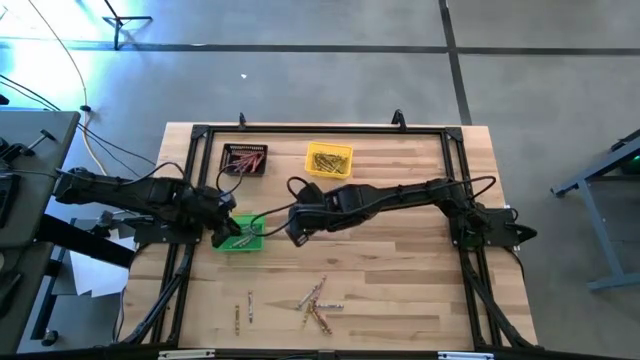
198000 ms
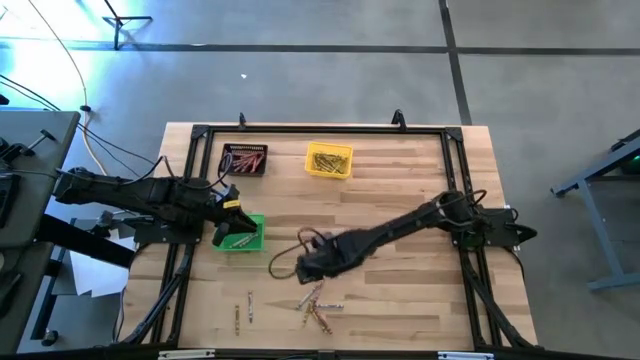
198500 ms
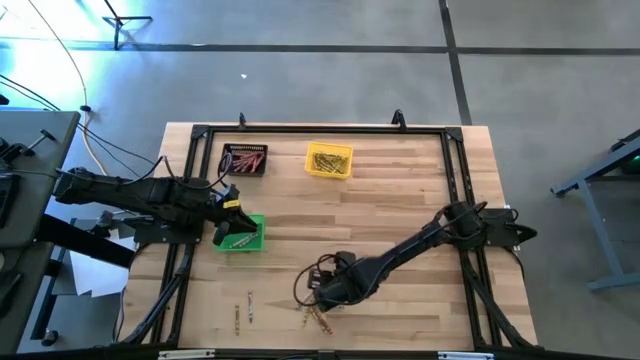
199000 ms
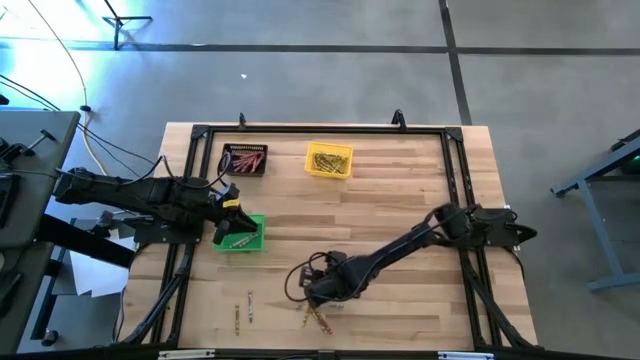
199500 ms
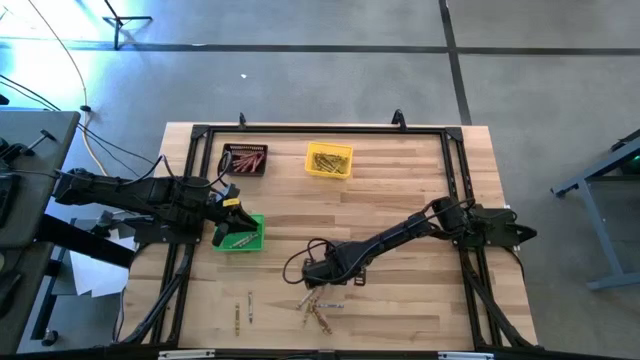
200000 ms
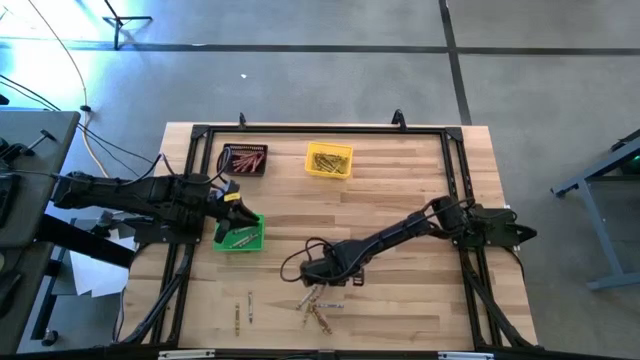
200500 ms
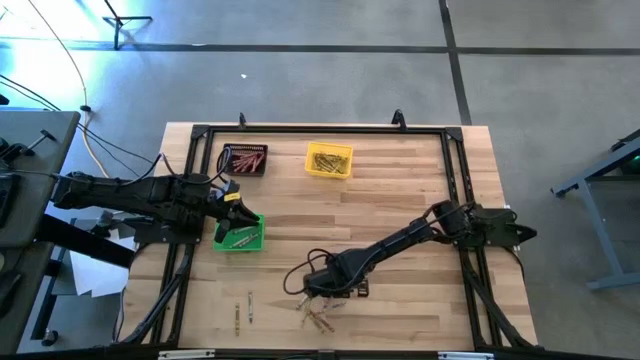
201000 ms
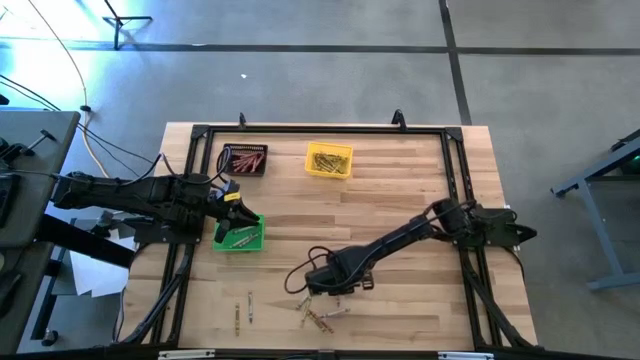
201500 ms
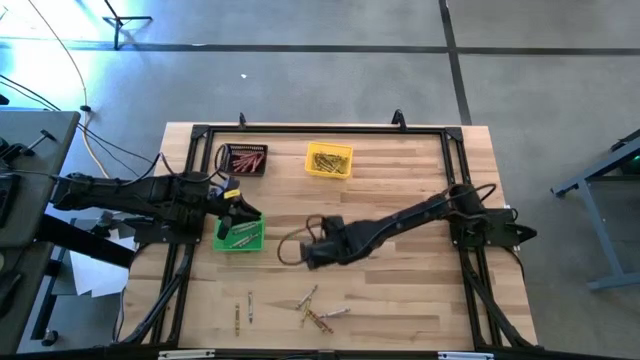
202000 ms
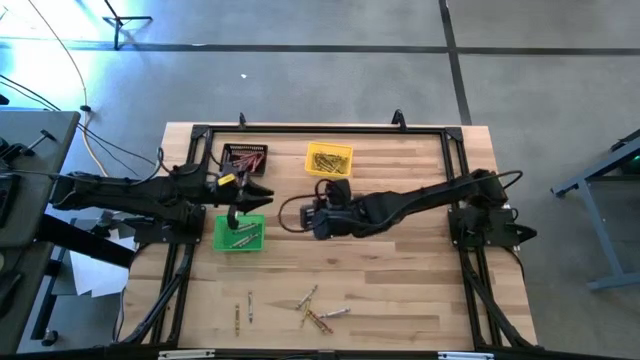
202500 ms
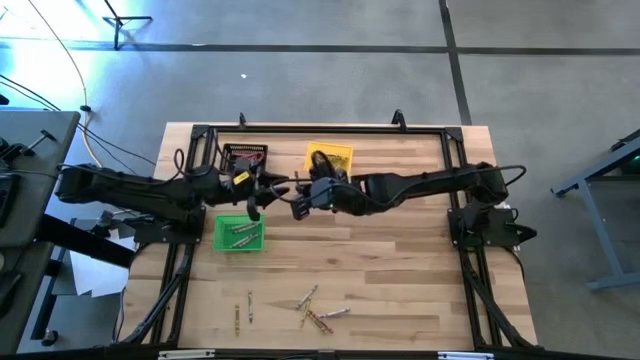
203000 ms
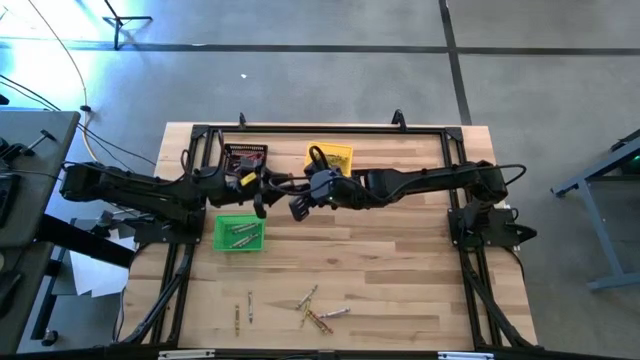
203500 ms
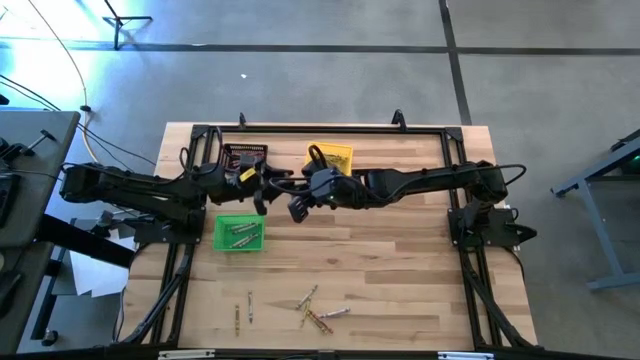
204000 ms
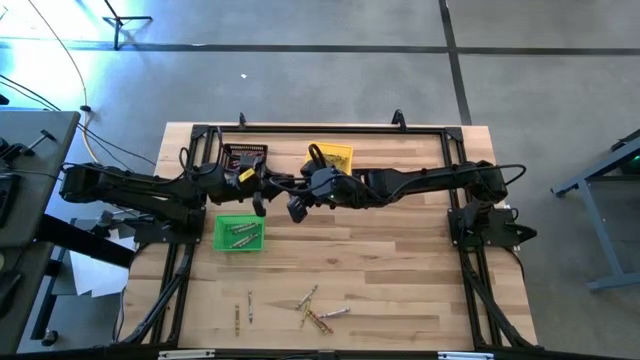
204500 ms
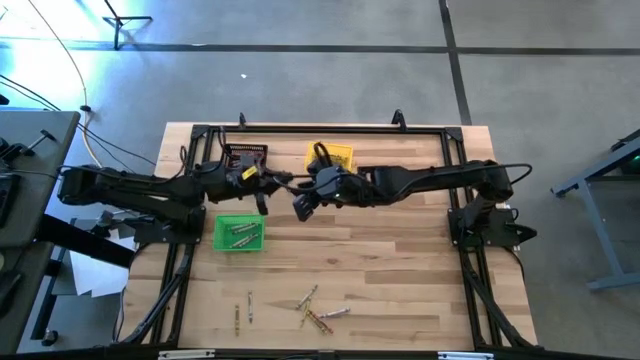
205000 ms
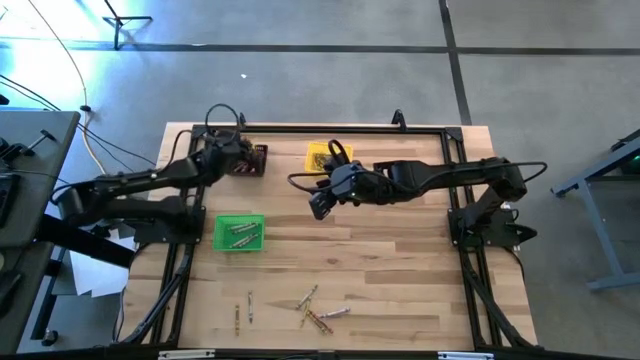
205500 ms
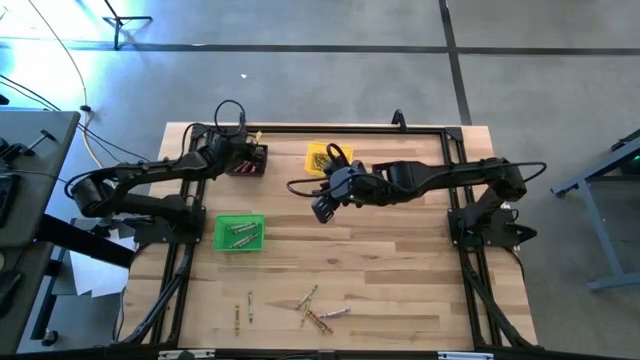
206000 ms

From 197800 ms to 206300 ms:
Task: Sort crayons
Put the red crayon into the black bin

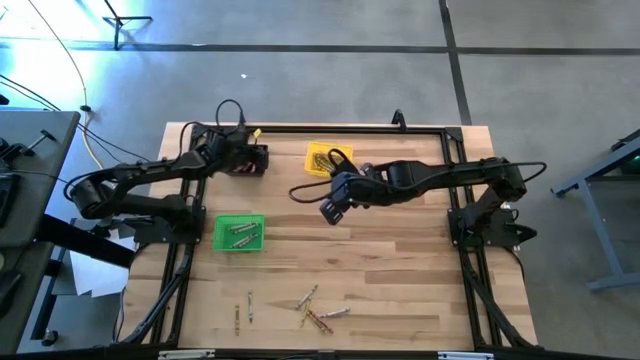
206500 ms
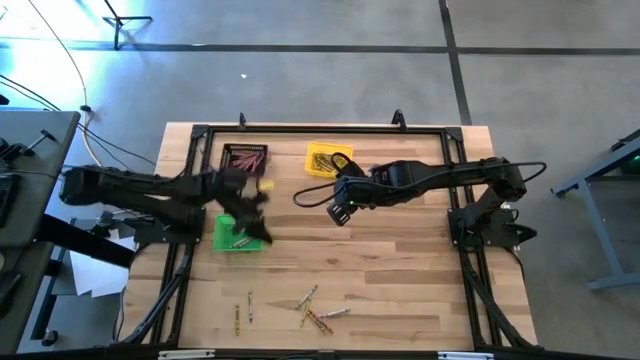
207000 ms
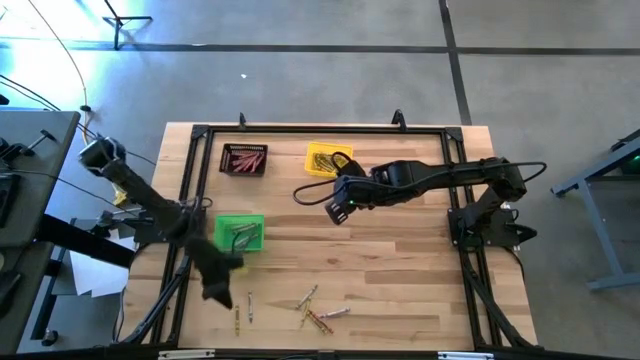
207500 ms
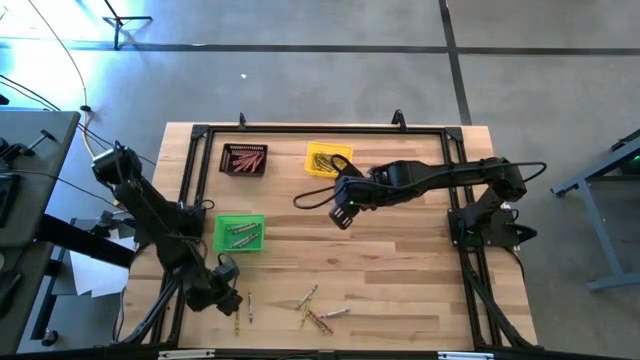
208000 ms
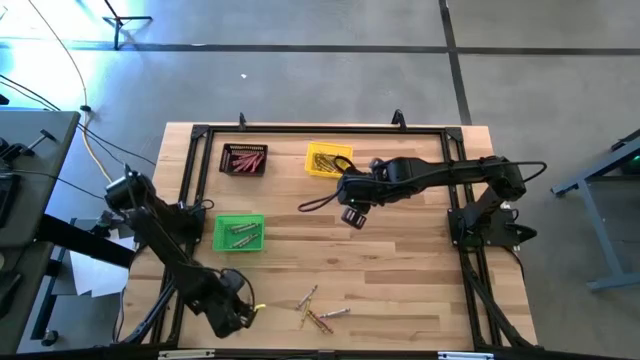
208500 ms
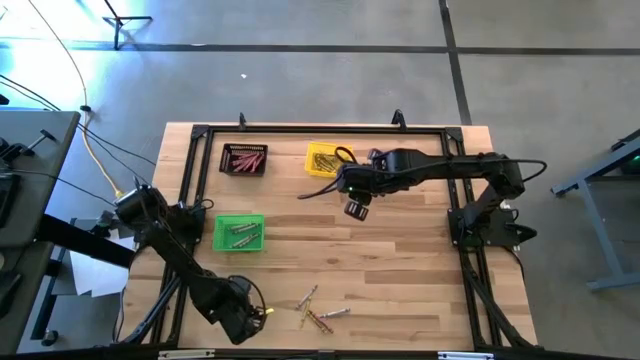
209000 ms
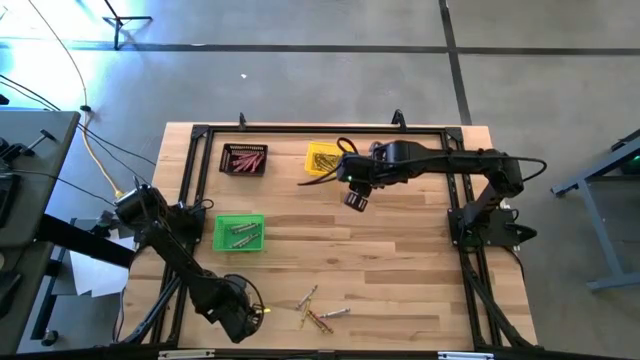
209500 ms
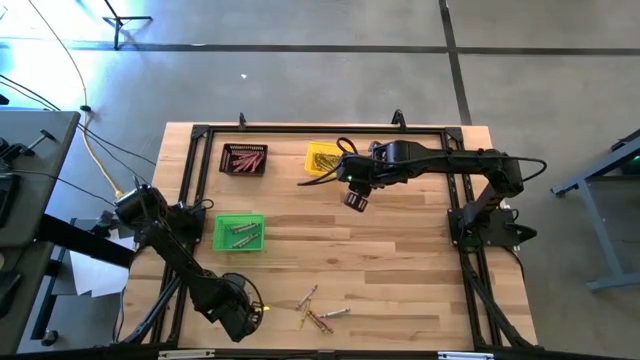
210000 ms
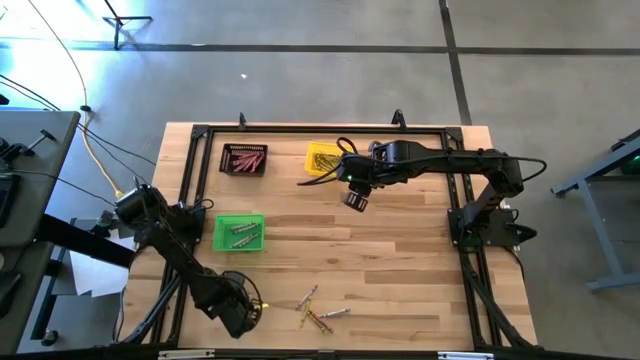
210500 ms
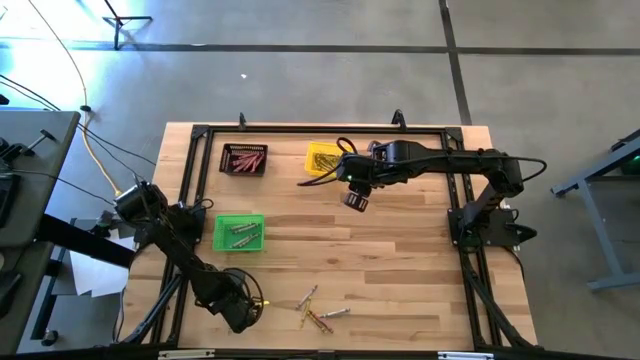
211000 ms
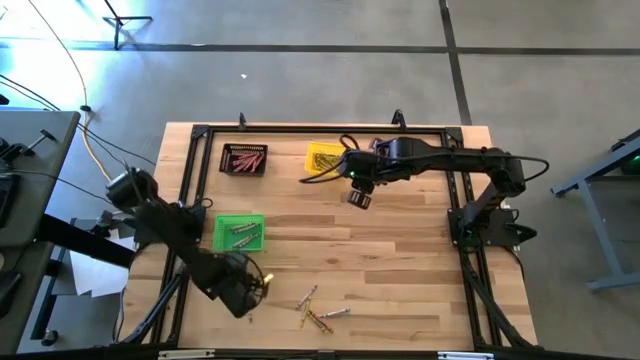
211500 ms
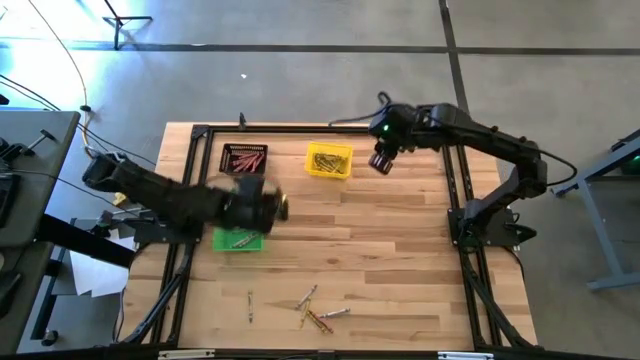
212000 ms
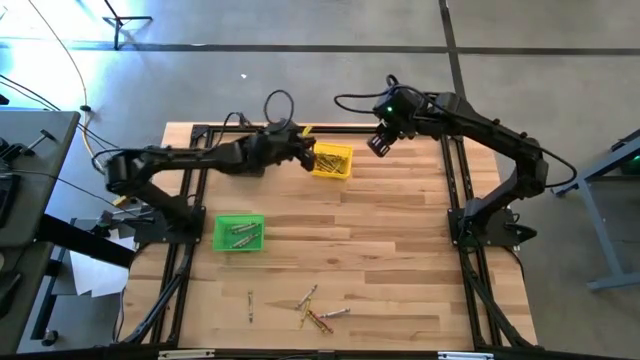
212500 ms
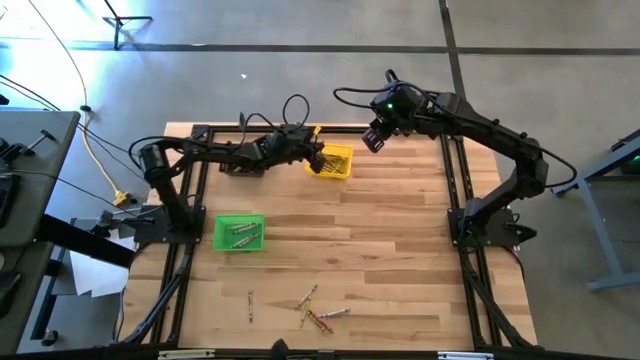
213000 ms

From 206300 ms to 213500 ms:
Put the yellow crayon into the yellow bin

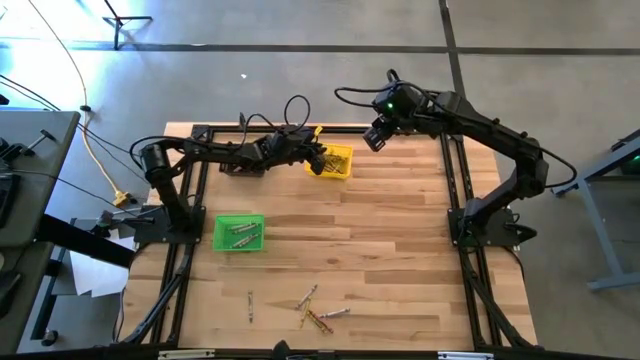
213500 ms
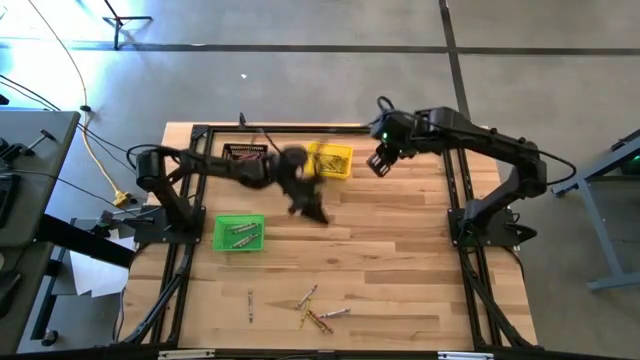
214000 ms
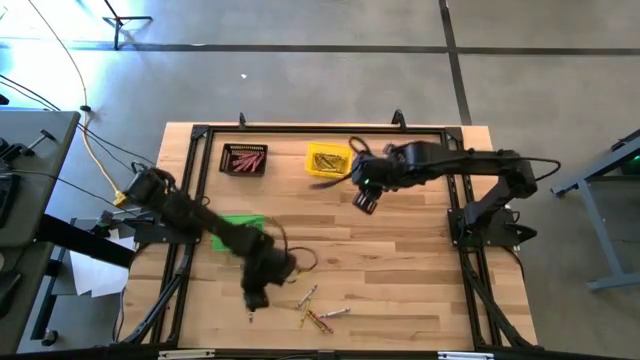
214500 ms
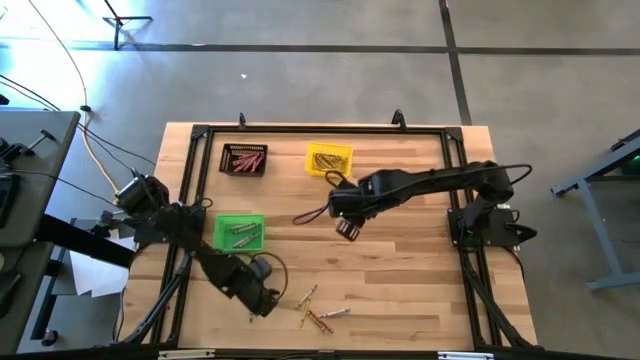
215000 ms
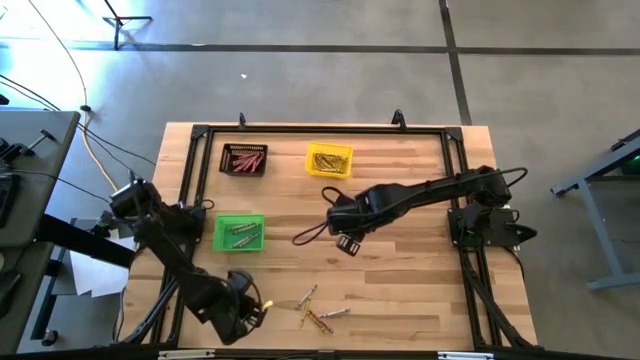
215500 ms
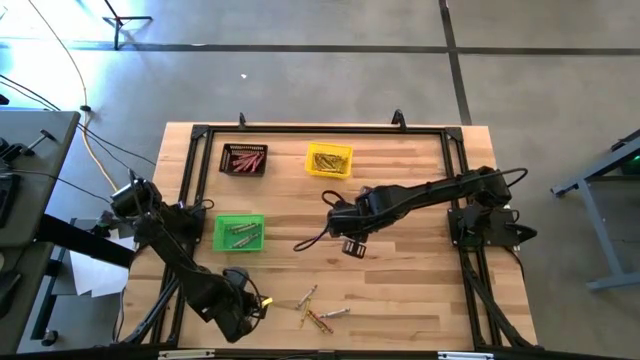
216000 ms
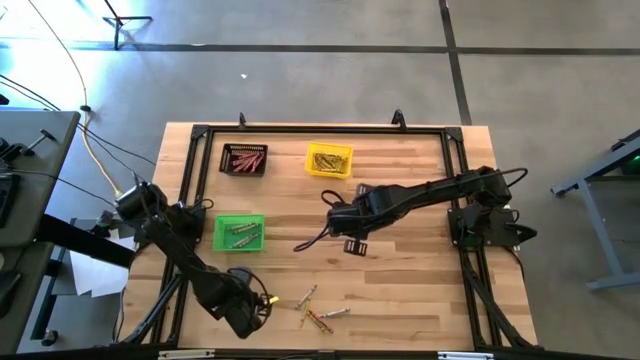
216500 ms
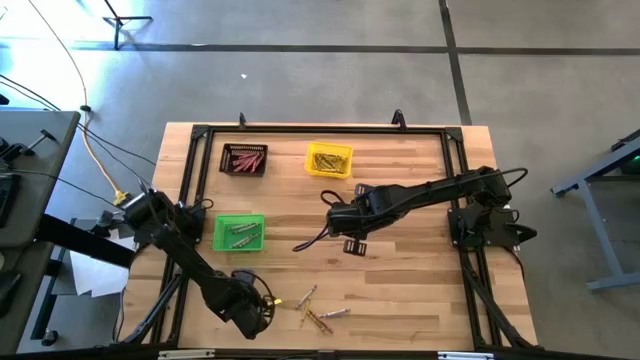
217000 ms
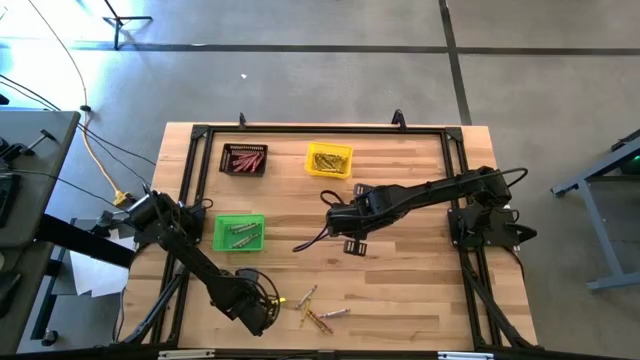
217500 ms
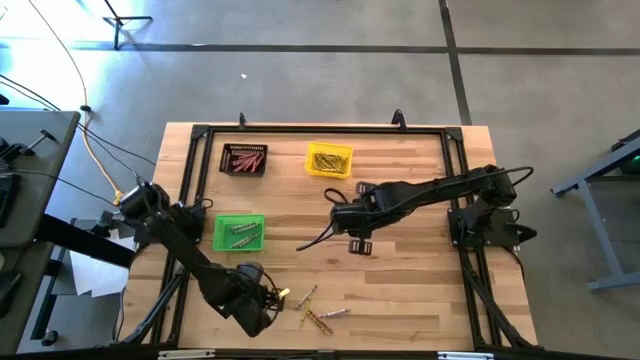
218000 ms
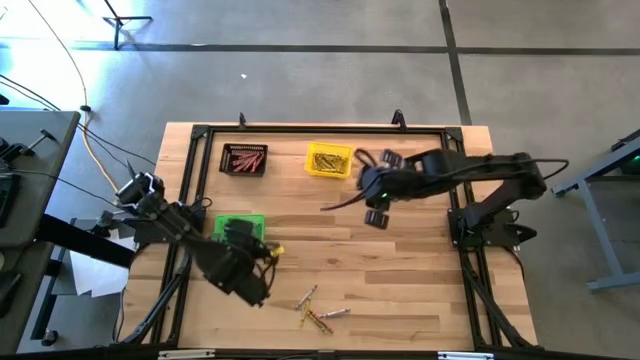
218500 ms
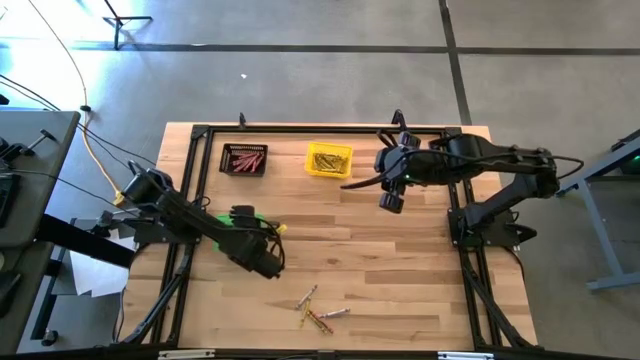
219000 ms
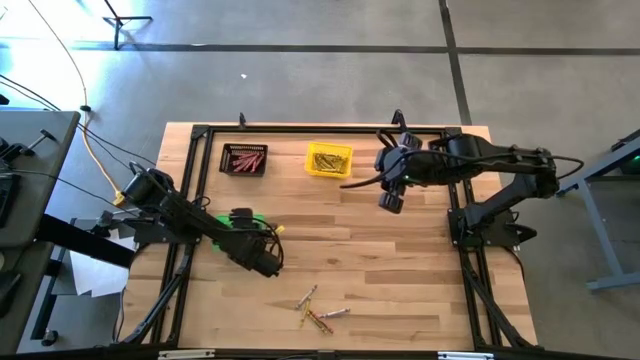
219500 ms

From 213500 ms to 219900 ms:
Put the blue crayon into the green bin
